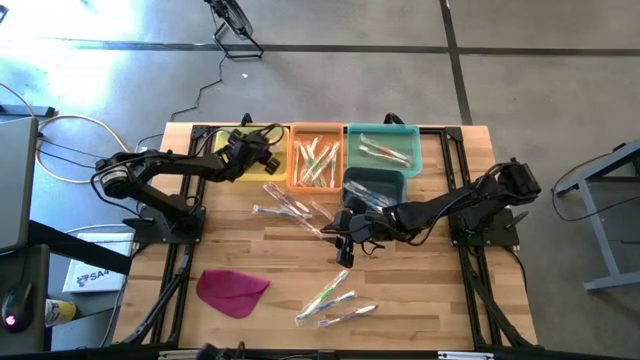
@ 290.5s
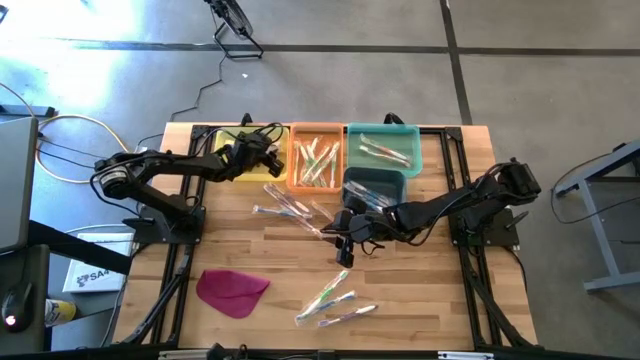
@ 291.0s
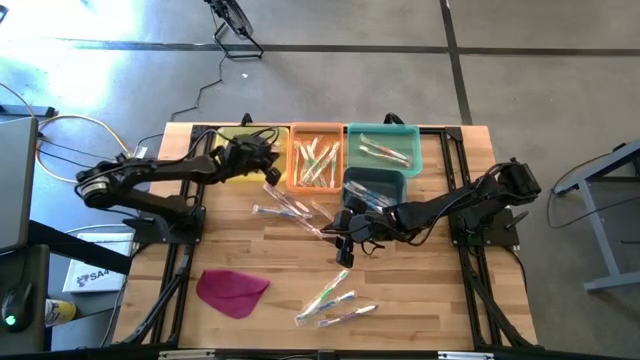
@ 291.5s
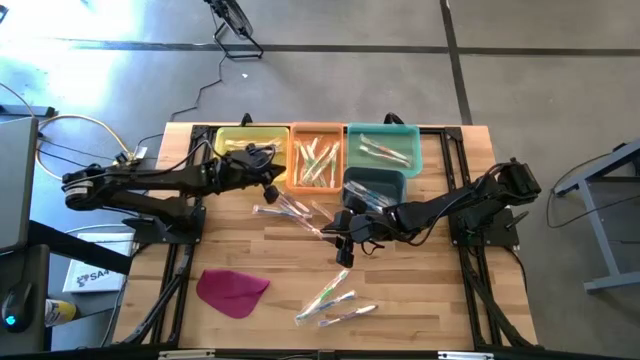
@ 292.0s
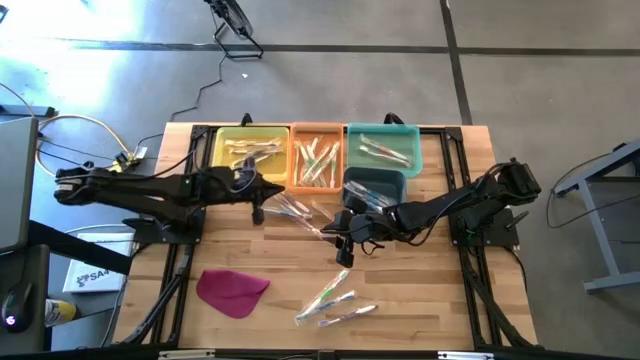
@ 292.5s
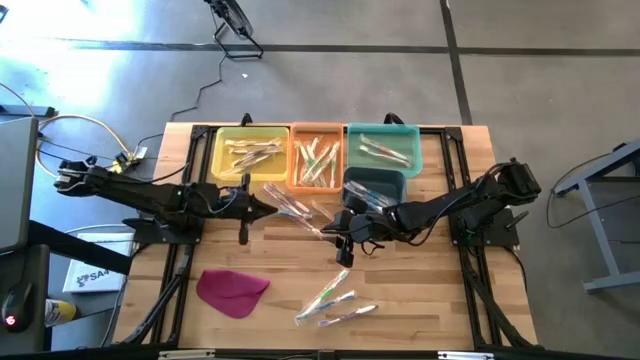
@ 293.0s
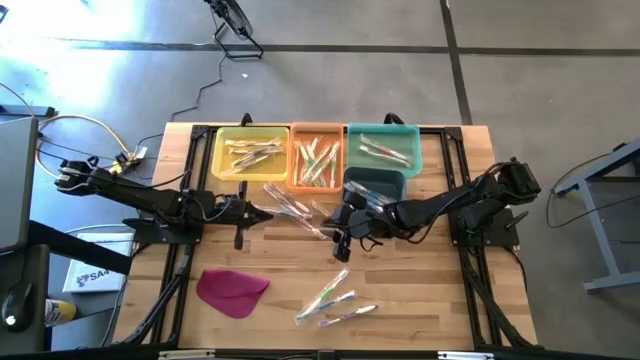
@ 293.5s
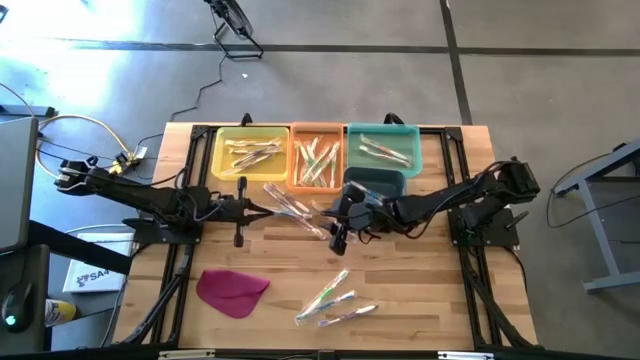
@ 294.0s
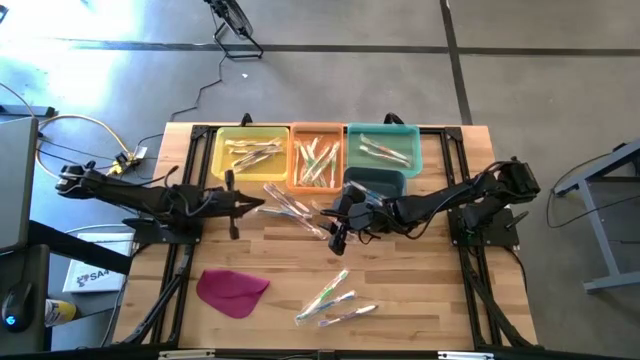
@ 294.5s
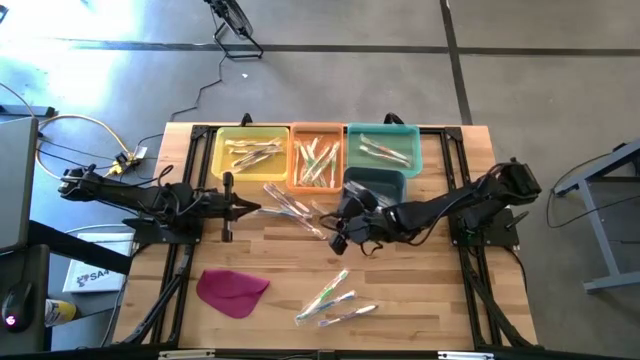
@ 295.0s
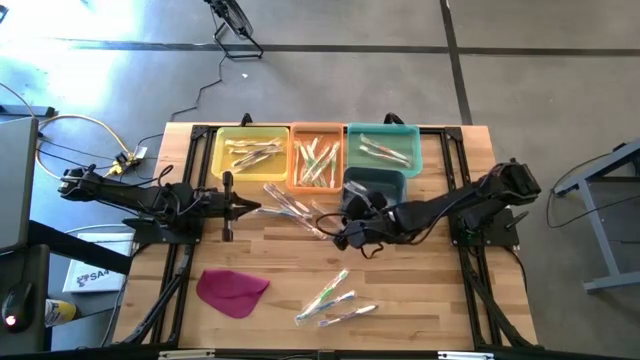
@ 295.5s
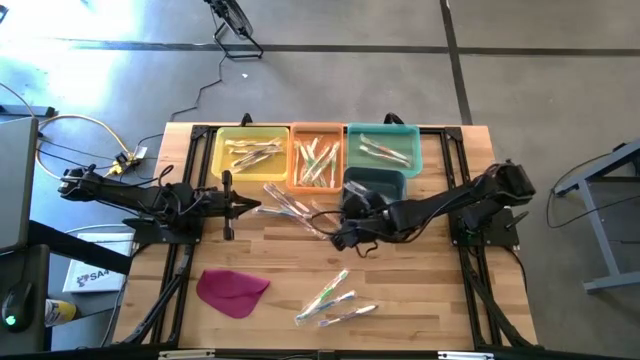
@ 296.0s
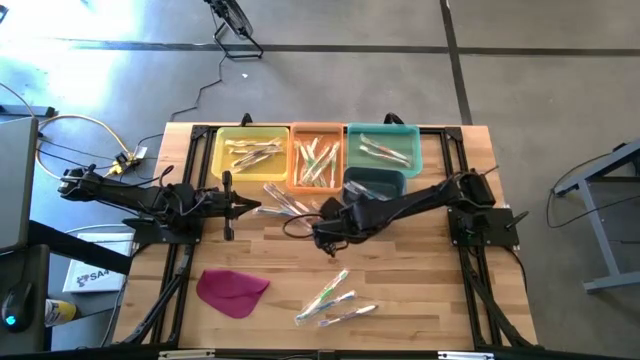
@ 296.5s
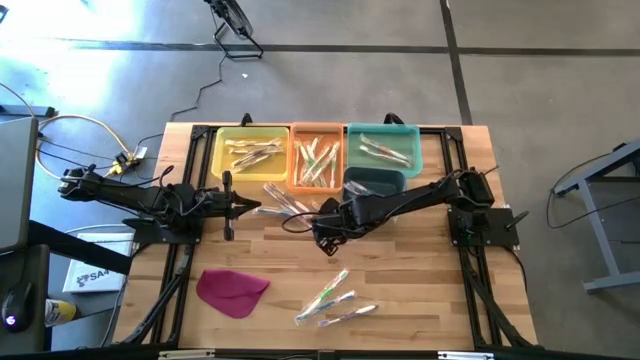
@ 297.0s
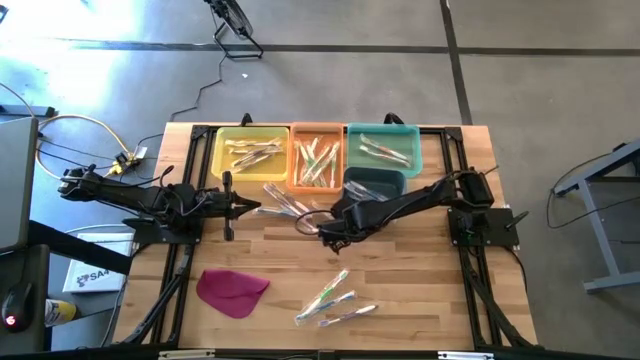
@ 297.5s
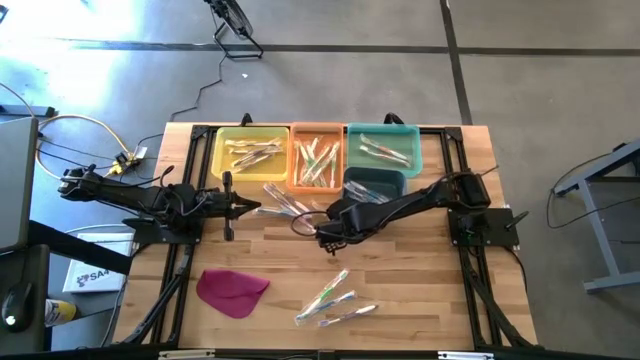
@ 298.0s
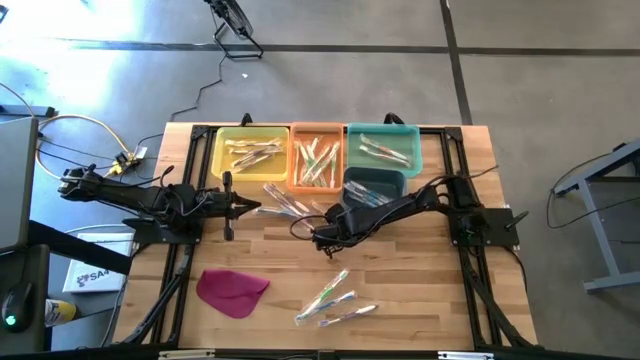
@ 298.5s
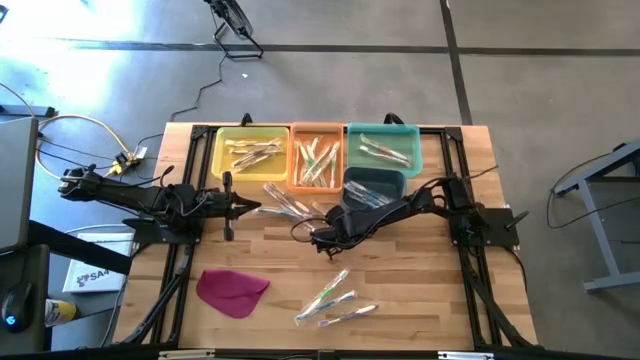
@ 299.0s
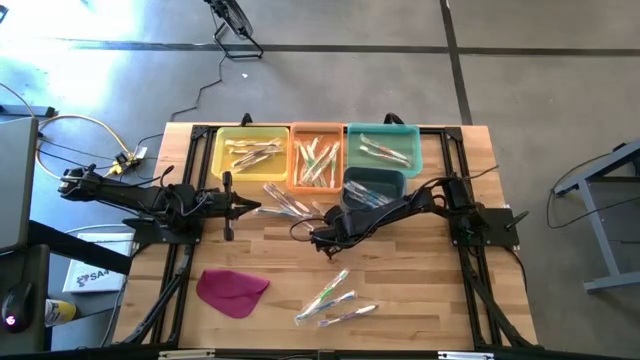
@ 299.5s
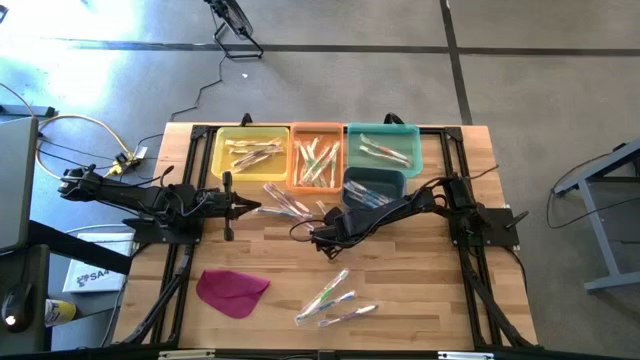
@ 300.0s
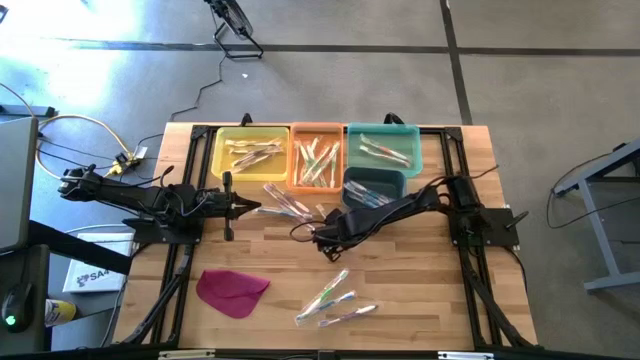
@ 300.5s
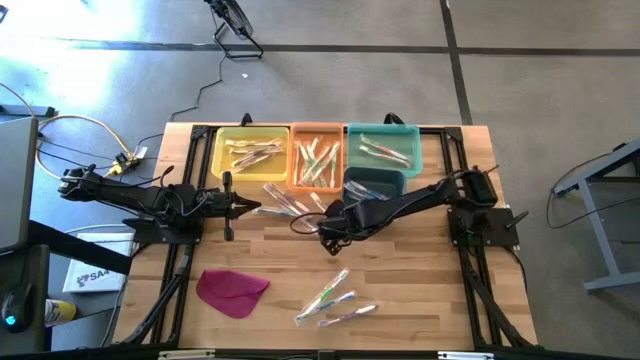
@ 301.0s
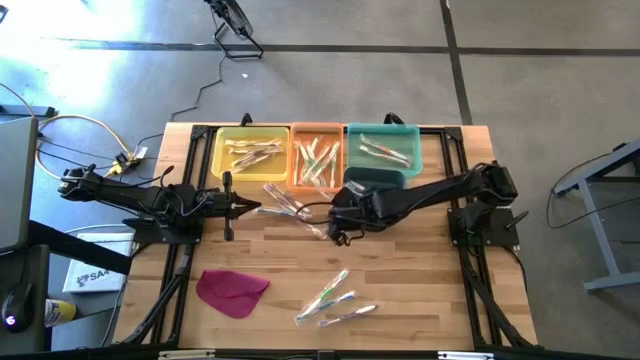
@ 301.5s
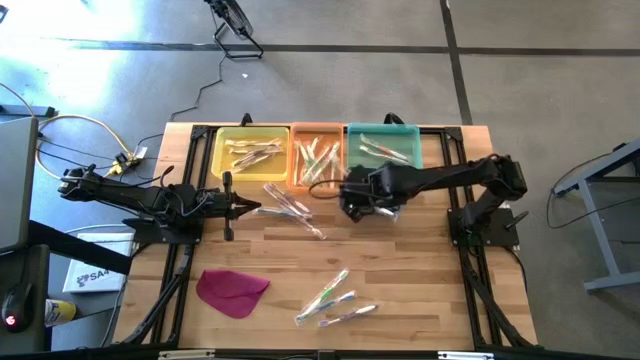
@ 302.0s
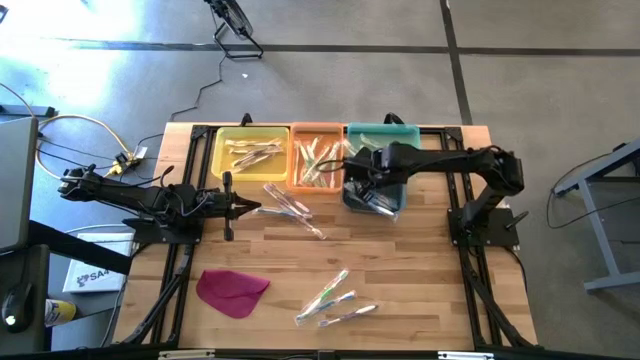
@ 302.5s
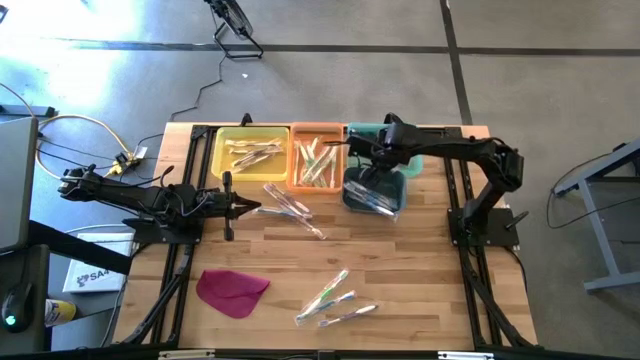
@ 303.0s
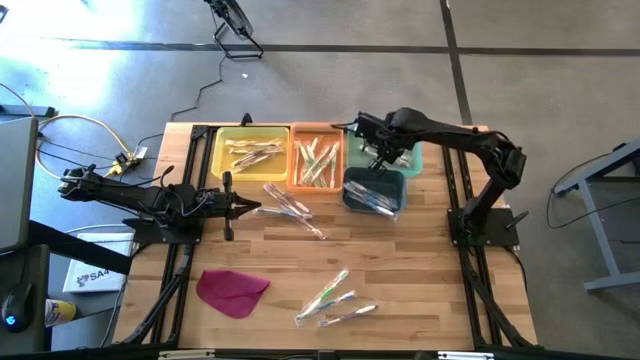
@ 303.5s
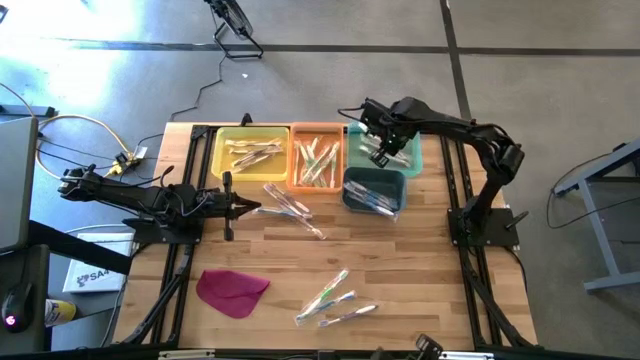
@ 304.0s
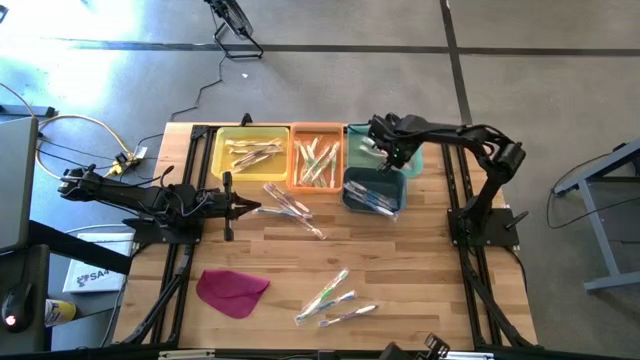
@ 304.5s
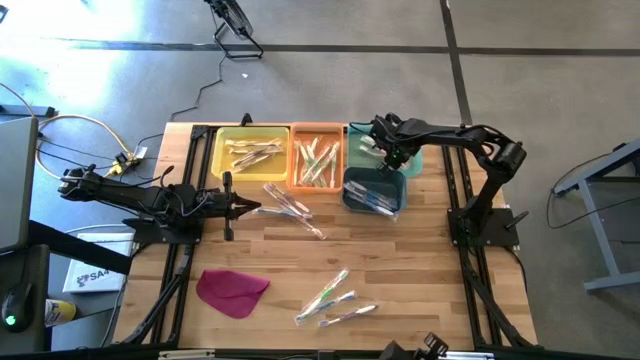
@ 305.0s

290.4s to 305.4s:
Task: Pick & Place Toothbrushes
Put the orange toothbrush into the blue bin

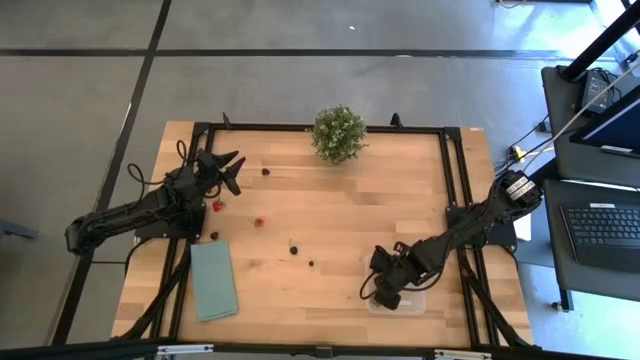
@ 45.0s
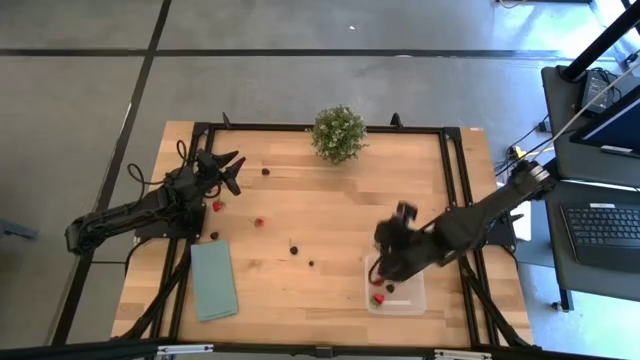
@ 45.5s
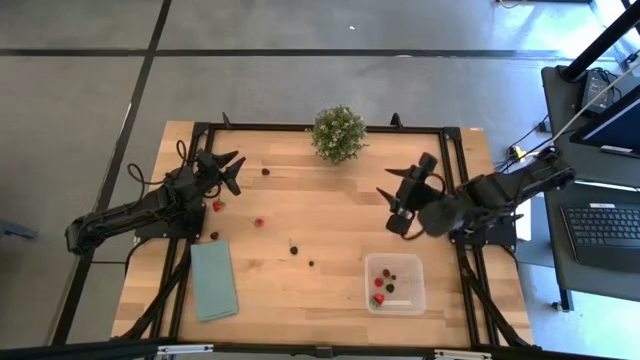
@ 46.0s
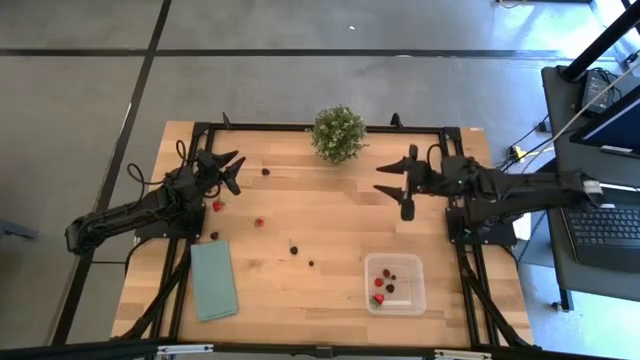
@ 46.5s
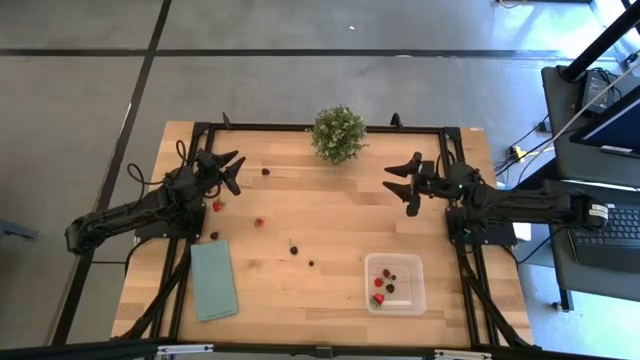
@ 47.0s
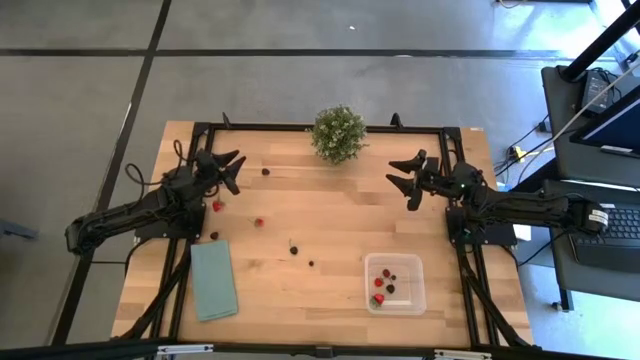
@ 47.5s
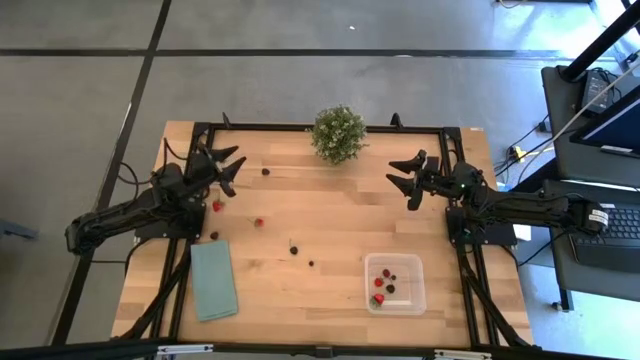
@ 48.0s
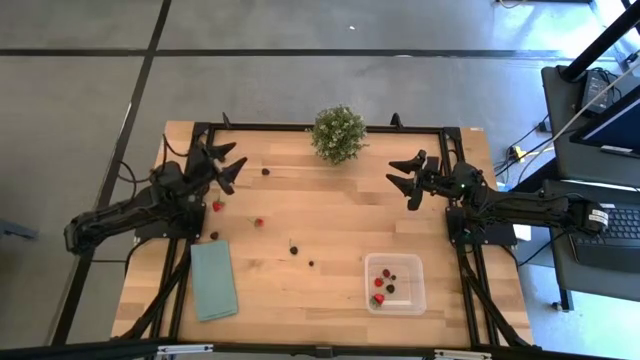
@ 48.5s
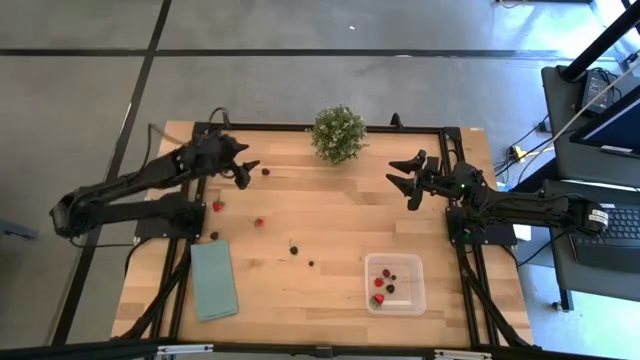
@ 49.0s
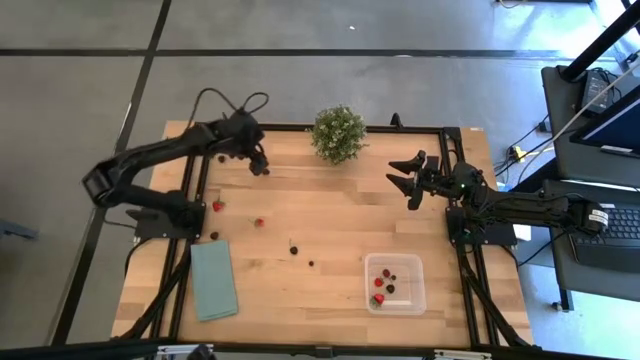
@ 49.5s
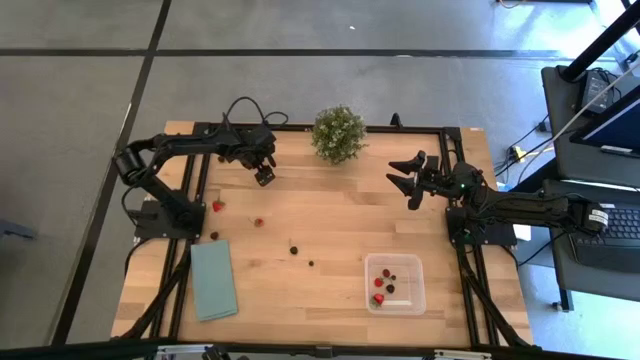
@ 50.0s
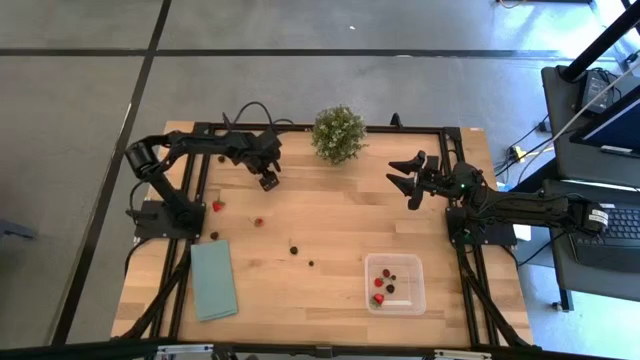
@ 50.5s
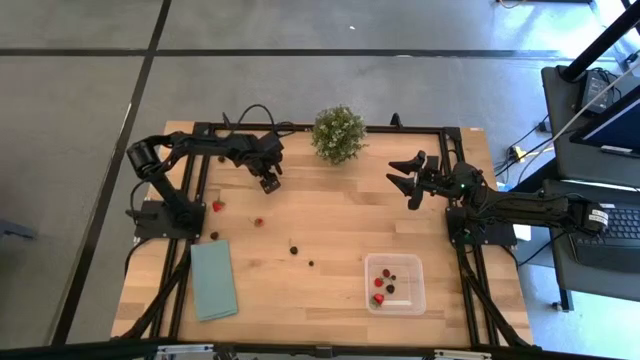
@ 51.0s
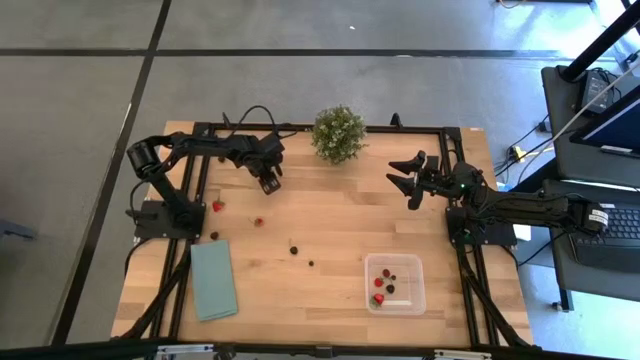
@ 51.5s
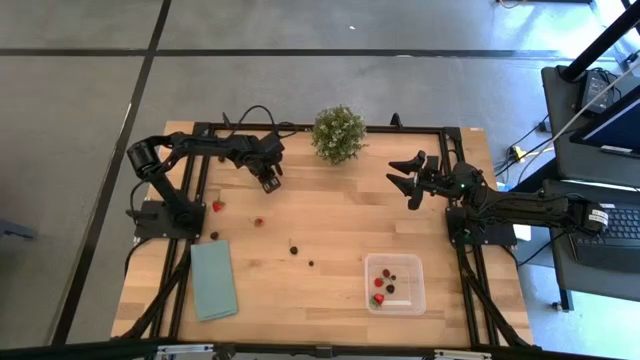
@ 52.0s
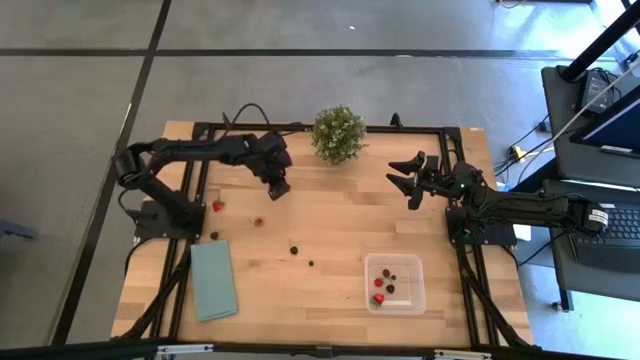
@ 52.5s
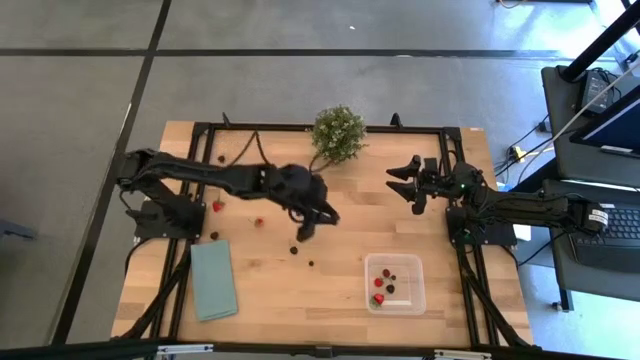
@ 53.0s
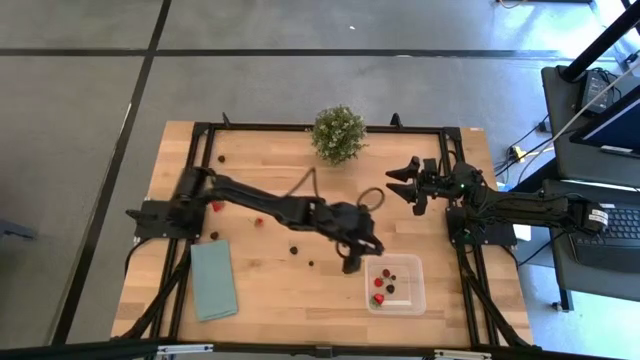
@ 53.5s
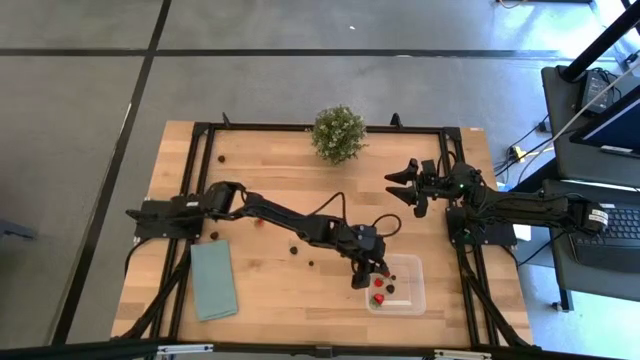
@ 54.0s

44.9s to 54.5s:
Task: Pick and placing Produce into tupperware
Put the top blackberry into the bin
